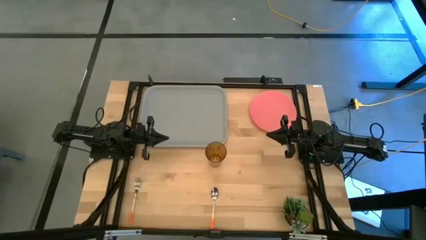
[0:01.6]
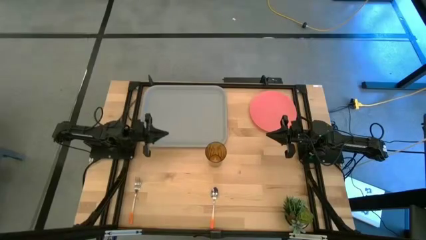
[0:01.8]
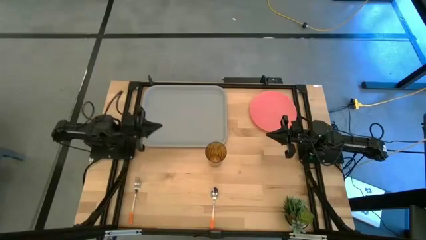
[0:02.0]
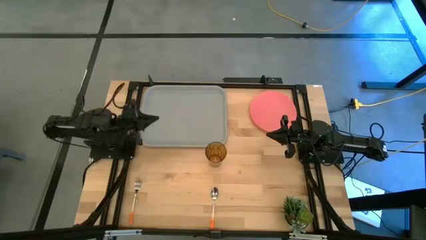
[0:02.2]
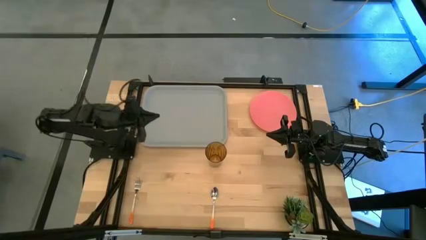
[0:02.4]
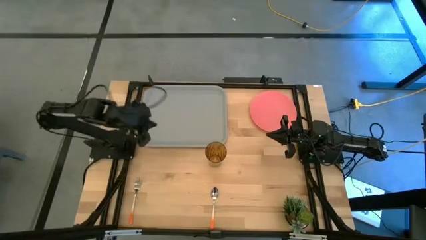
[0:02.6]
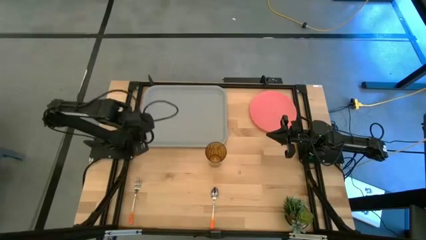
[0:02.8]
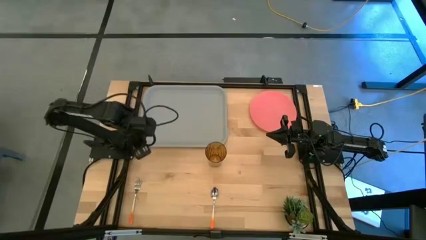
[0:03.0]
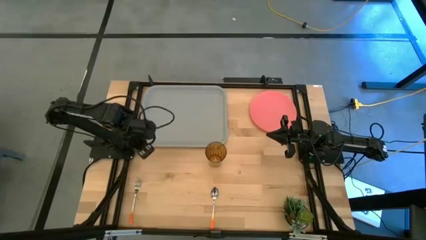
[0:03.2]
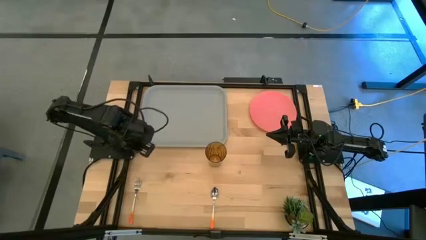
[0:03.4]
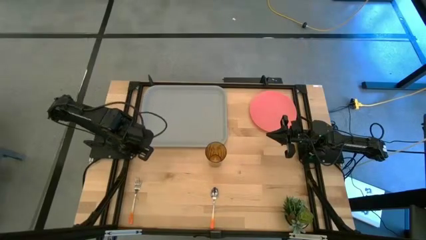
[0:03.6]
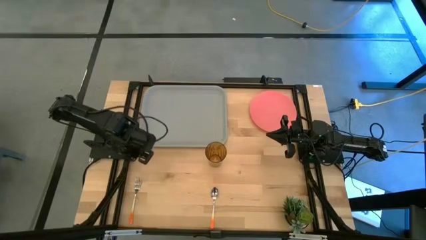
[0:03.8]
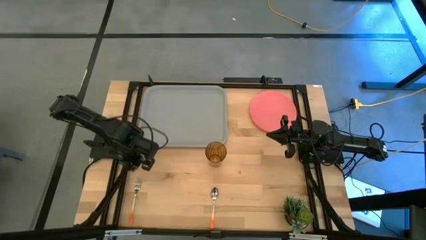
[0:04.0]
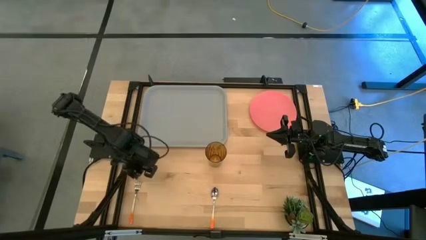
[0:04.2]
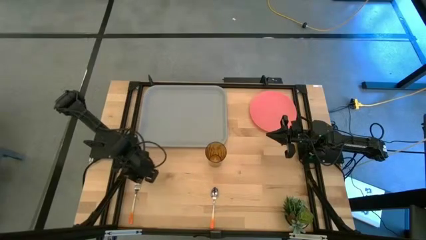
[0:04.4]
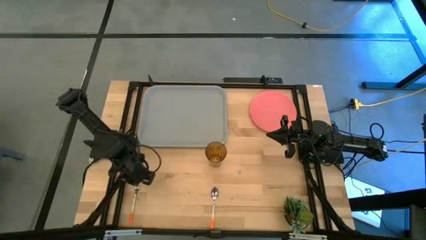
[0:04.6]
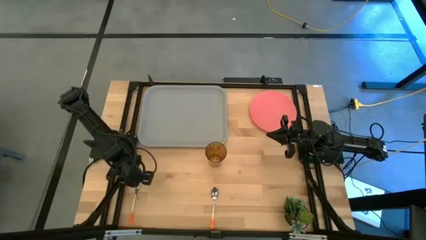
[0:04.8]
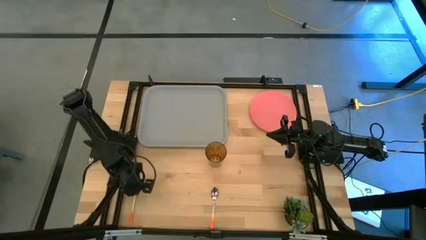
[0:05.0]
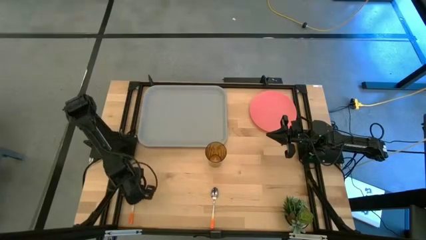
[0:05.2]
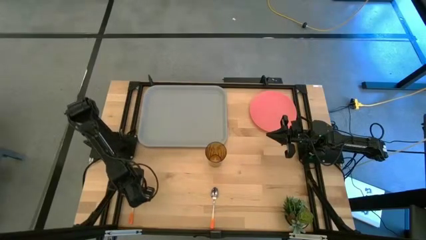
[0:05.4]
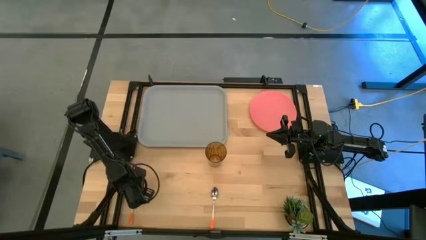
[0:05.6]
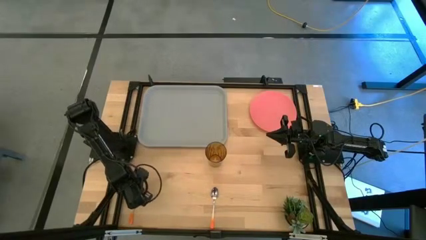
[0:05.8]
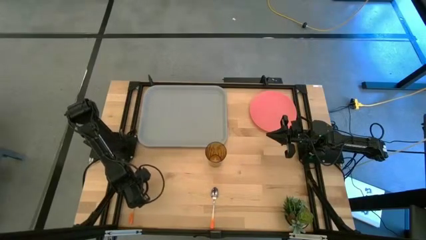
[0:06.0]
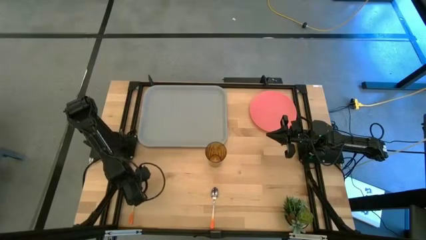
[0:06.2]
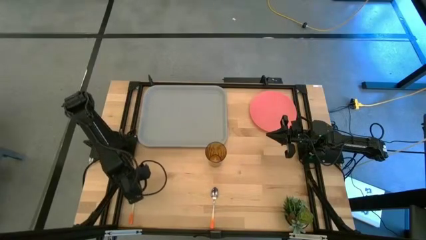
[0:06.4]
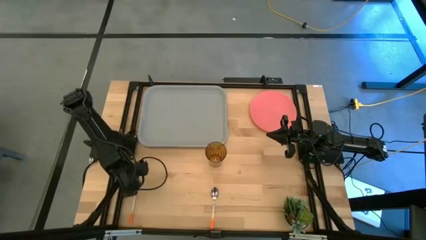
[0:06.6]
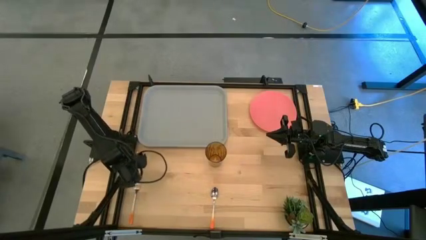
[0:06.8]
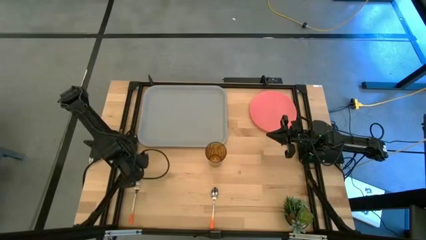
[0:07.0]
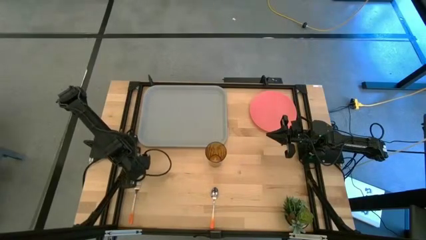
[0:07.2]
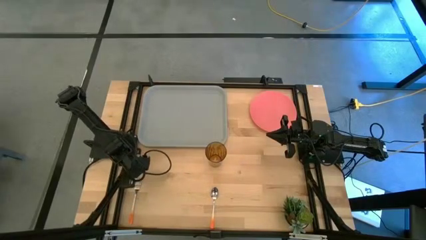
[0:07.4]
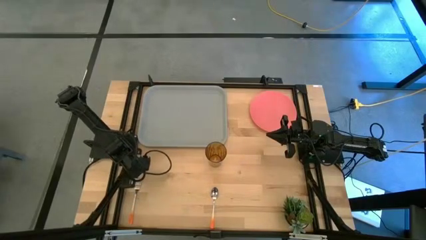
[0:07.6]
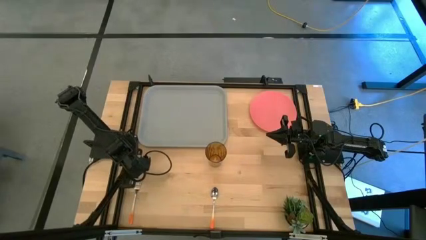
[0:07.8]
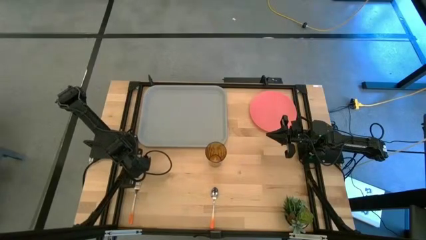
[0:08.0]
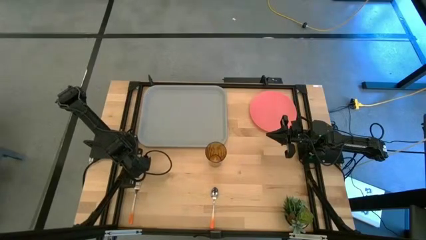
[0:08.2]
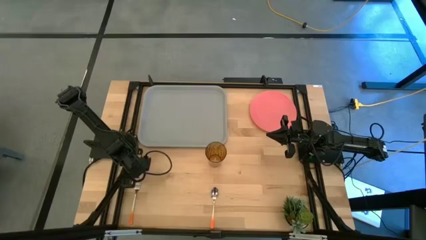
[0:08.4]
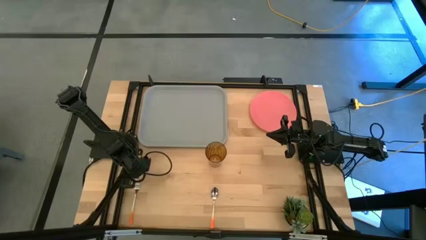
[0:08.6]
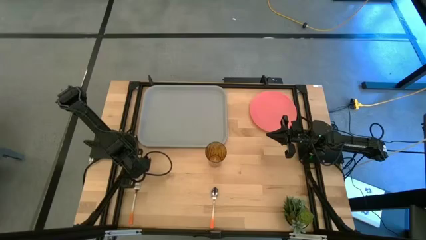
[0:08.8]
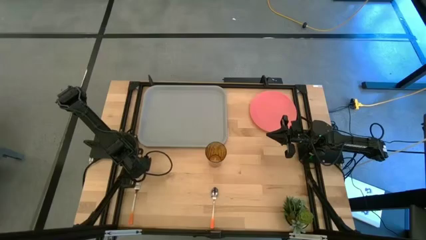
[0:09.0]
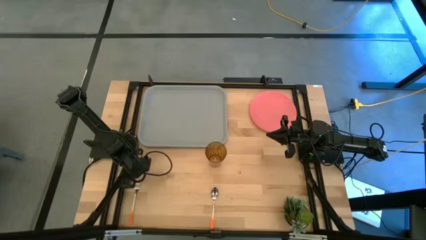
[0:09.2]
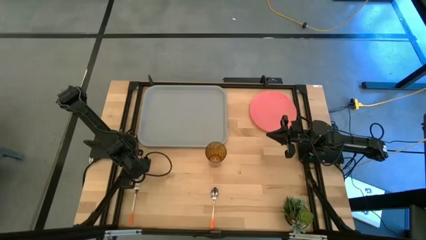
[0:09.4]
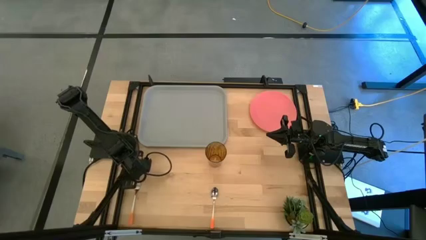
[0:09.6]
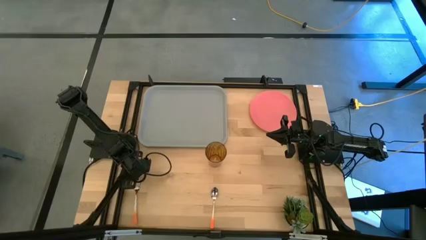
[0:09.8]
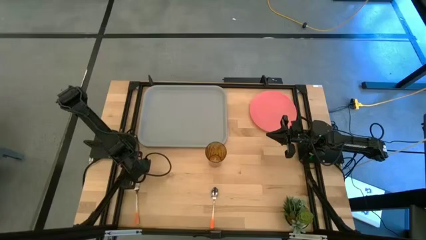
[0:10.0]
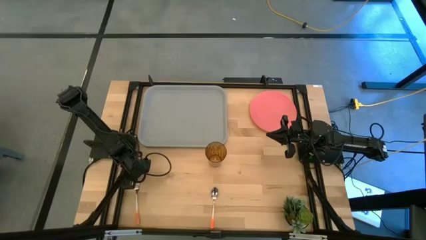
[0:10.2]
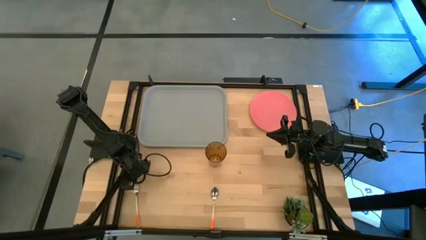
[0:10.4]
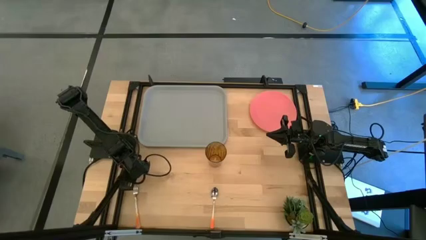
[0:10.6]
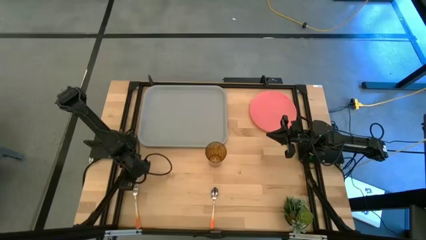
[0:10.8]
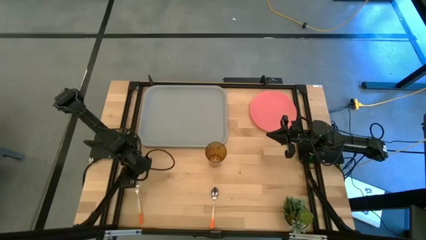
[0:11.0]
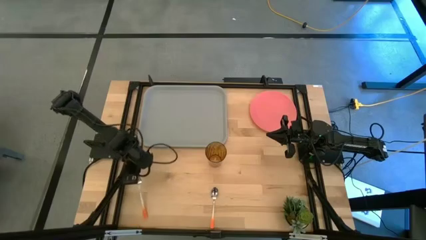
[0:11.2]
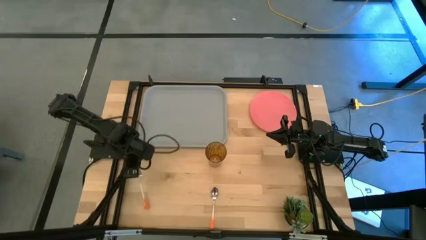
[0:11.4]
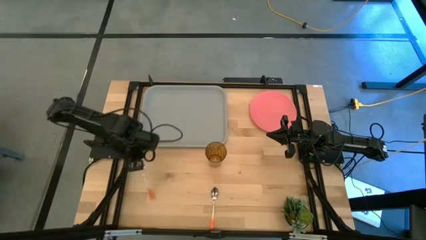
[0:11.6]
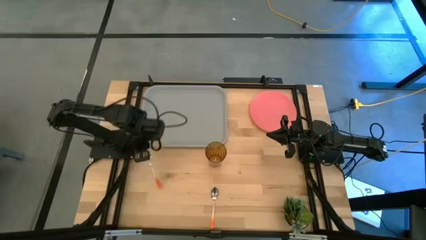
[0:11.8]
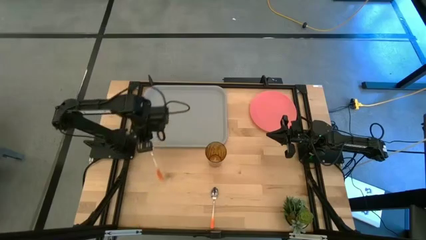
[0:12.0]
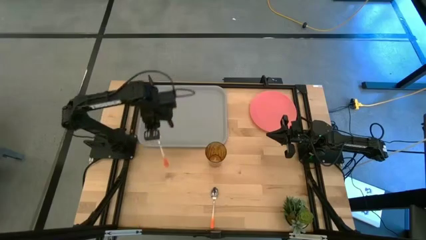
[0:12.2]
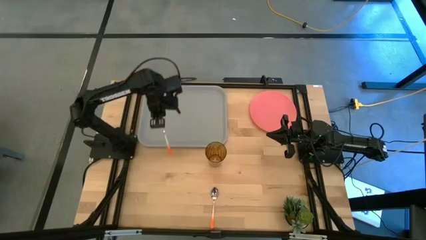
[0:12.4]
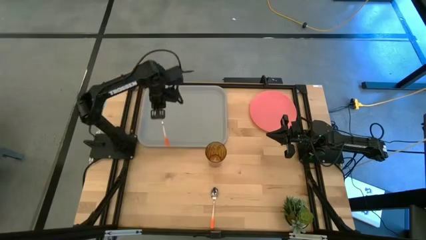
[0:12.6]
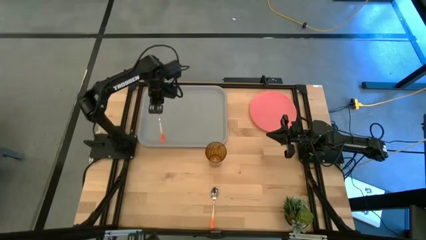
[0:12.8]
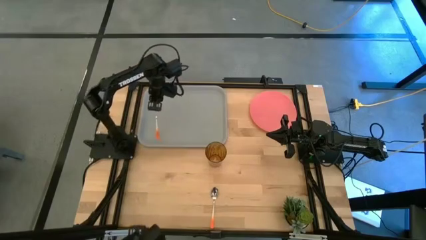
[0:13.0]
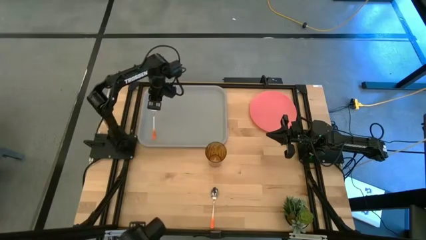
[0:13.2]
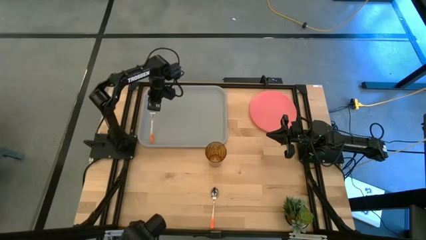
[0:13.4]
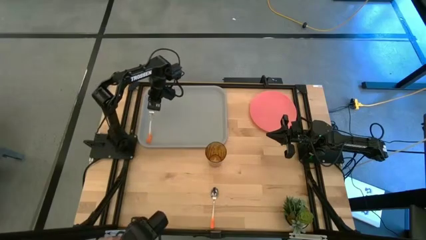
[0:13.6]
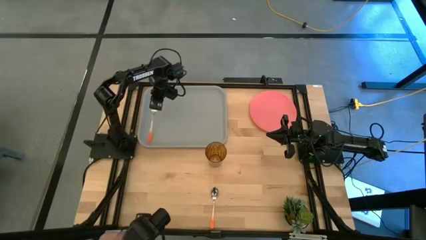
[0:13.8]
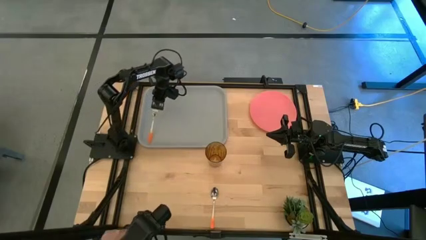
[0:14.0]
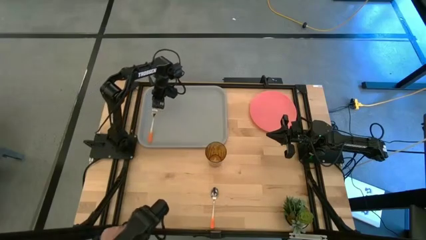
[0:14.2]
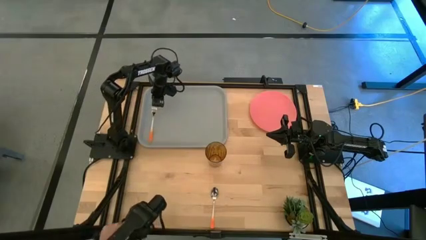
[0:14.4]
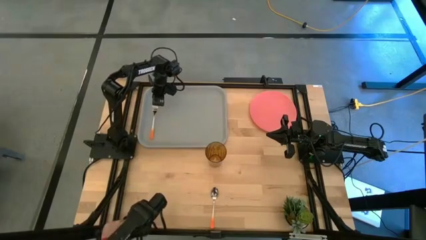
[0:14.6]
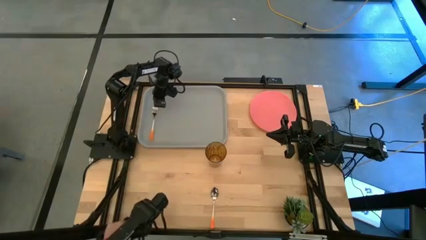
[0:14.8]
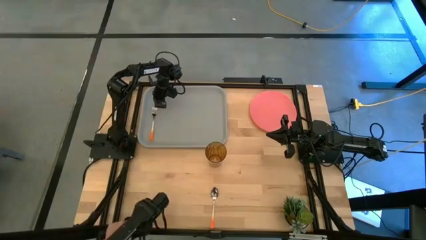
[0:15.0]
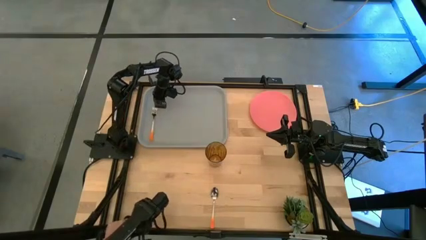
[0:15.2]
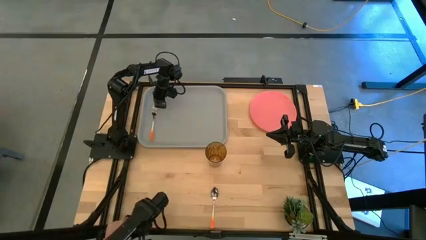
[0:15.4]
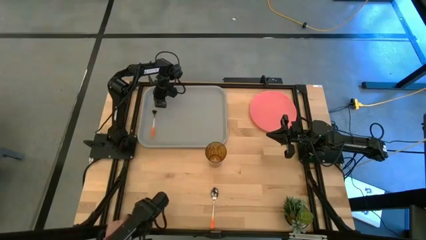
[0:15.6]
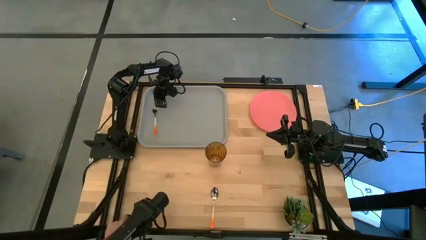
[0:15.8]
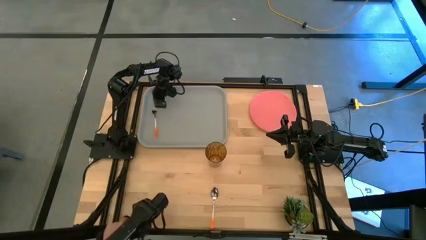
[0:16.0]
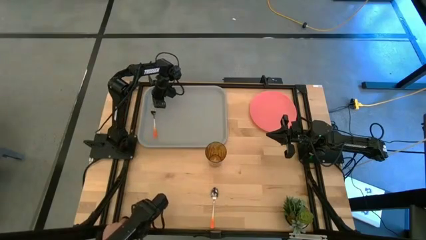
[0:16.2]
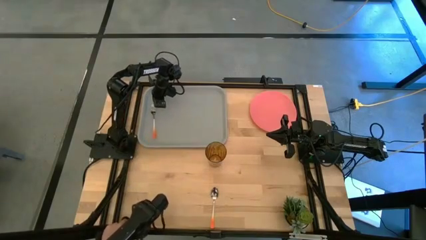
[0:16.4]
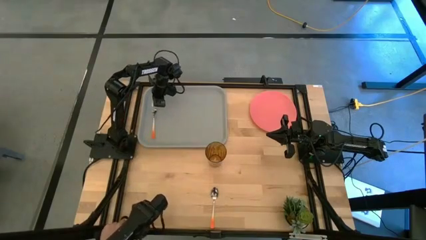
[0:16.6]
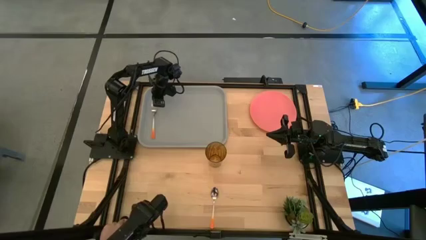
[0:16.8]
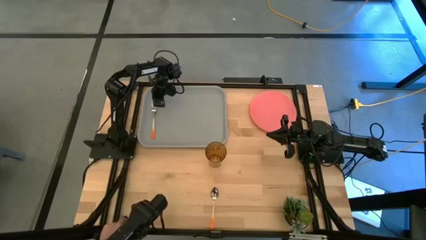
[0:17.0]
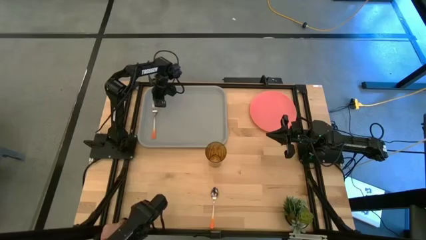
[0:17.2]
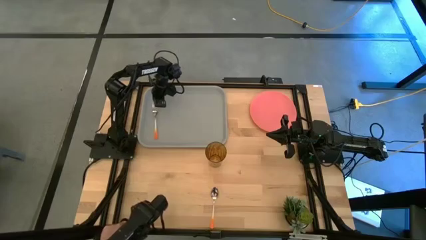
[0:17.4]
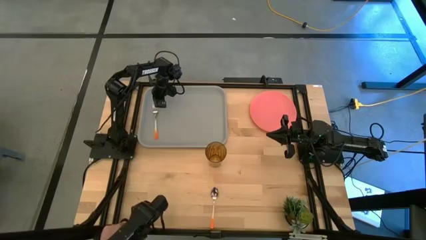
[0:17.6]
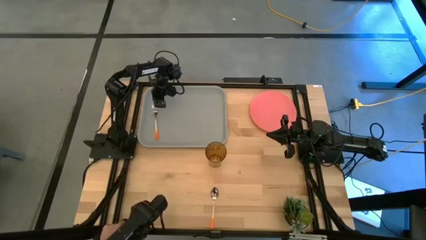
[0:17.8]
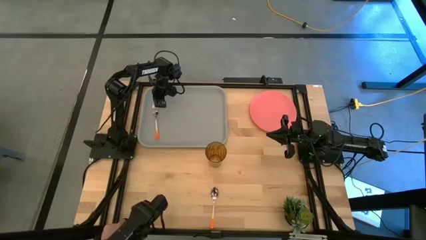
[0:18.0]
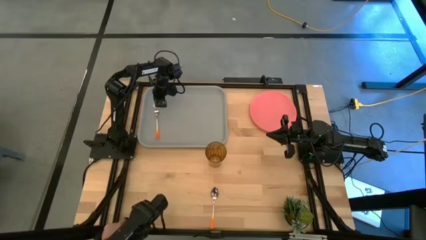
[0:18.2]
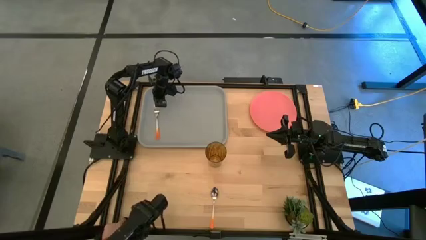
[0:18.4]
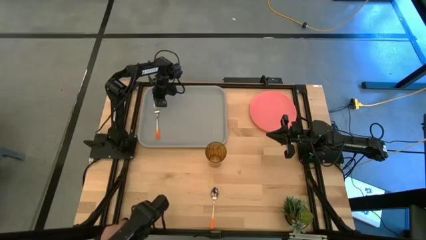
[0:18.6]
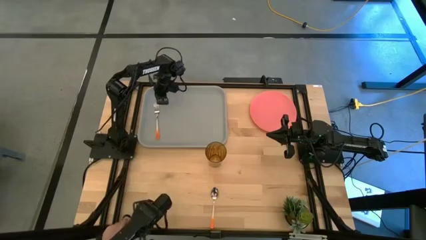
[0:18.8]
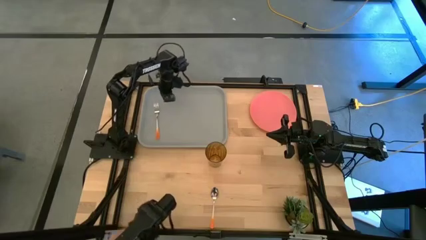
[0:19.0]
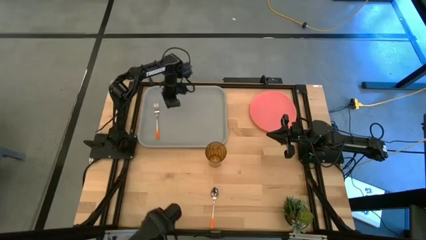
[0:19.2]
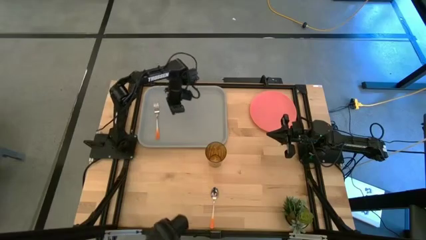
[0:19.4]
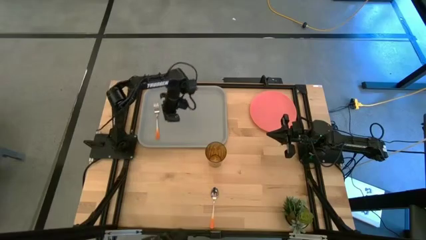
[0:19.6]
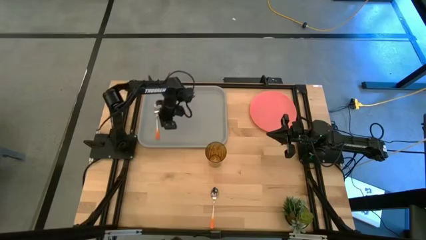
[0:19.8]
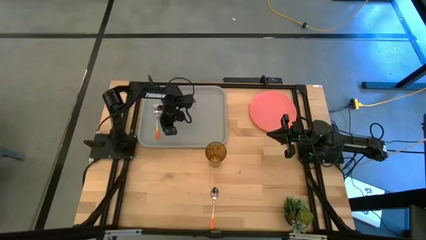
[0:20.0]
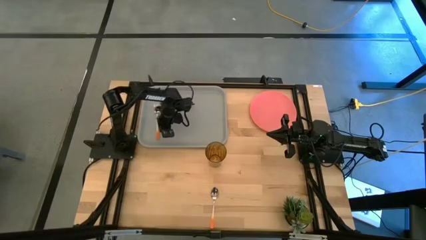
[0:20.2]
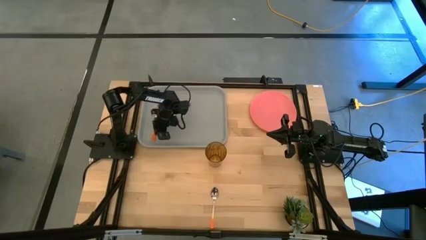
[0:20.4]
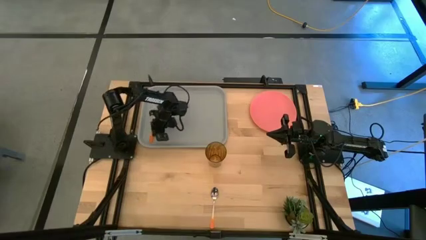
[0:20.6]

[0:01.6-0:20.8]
Task: Pick and place plate/cup/fork/spoon on tray
Put the orange fork on the gray serving tray
